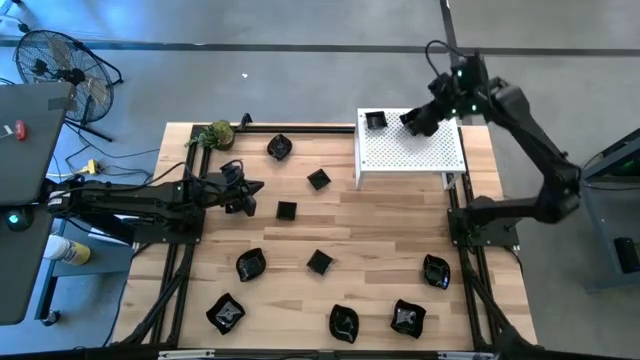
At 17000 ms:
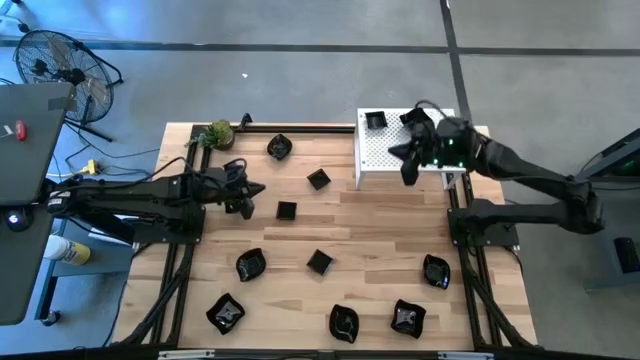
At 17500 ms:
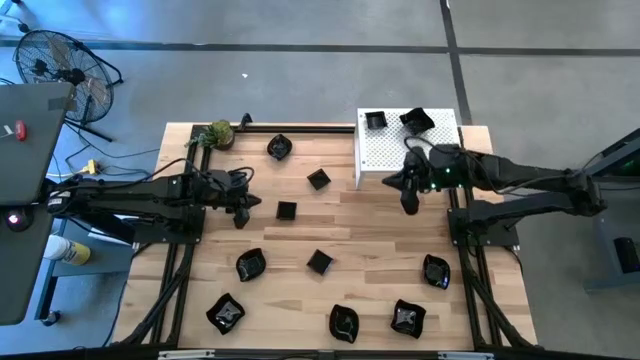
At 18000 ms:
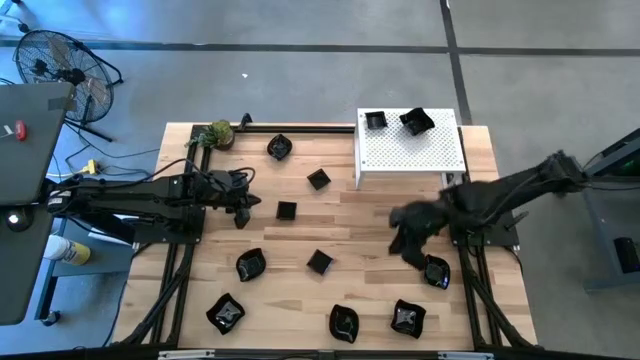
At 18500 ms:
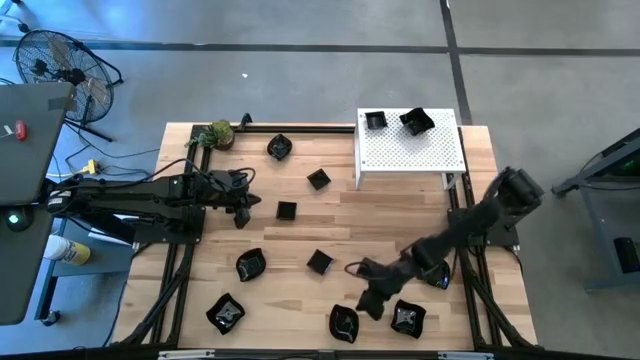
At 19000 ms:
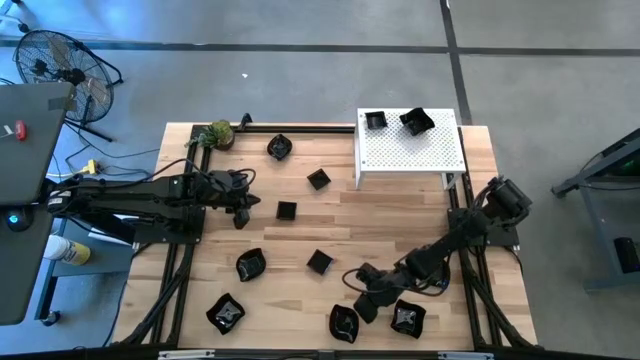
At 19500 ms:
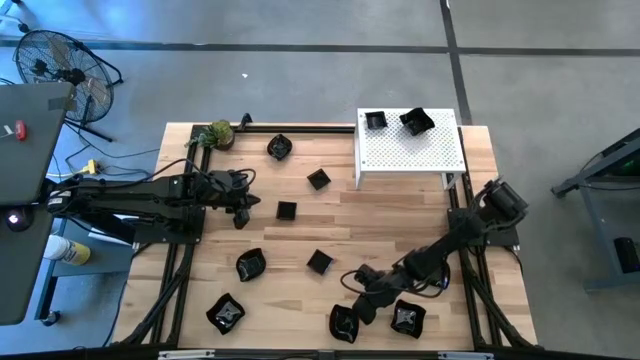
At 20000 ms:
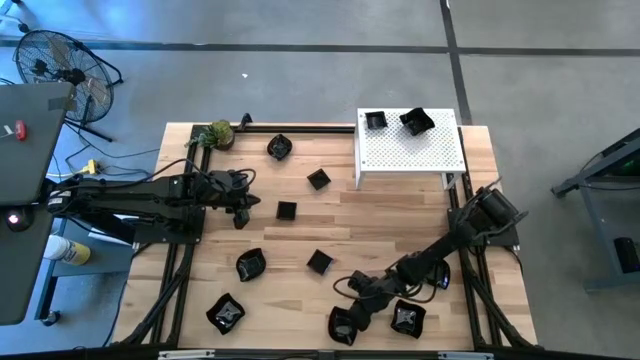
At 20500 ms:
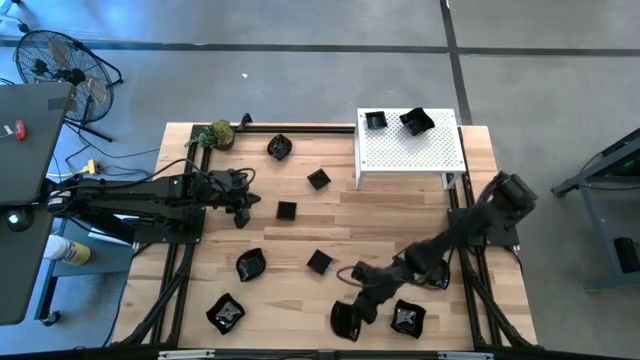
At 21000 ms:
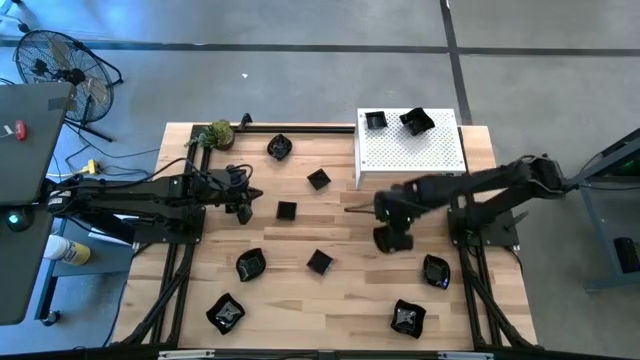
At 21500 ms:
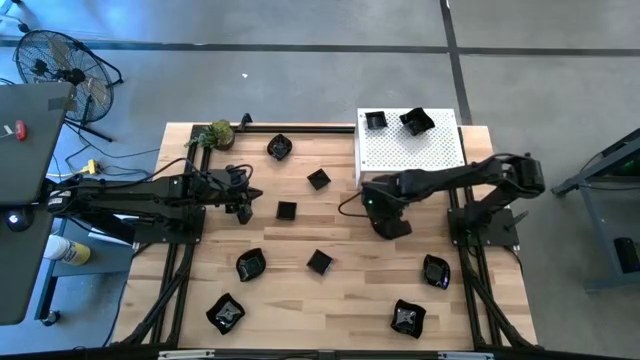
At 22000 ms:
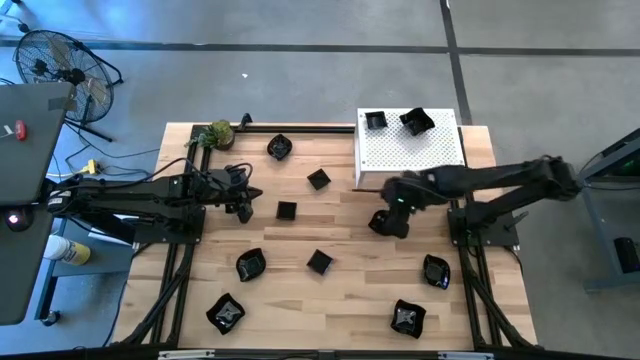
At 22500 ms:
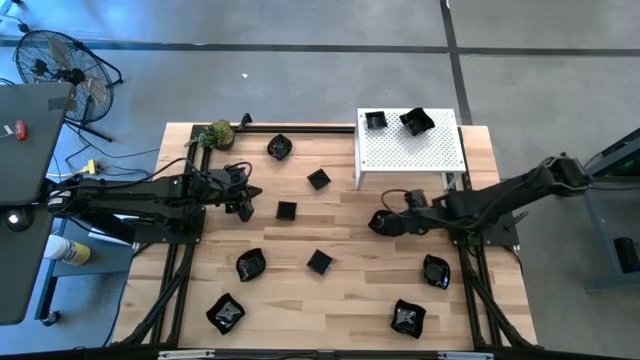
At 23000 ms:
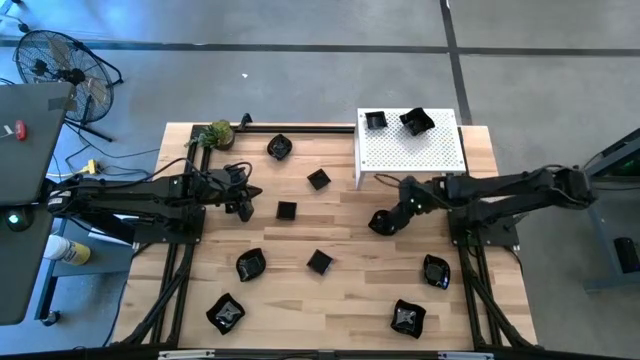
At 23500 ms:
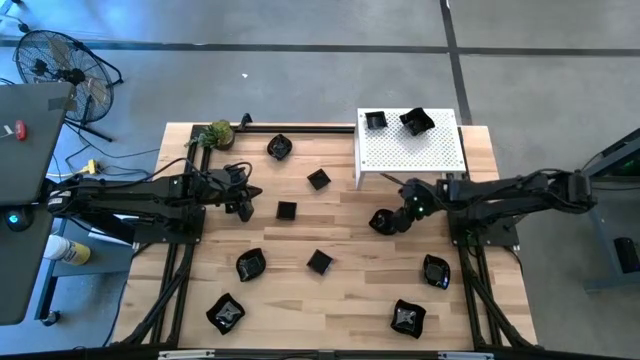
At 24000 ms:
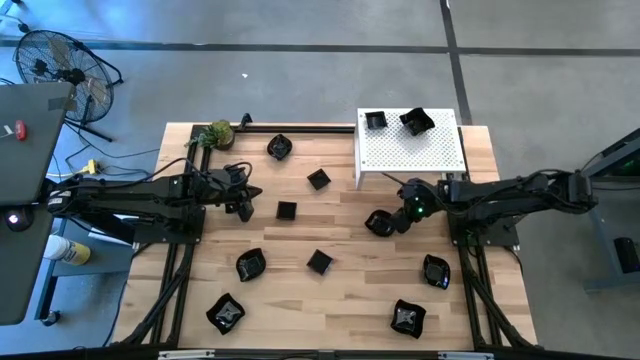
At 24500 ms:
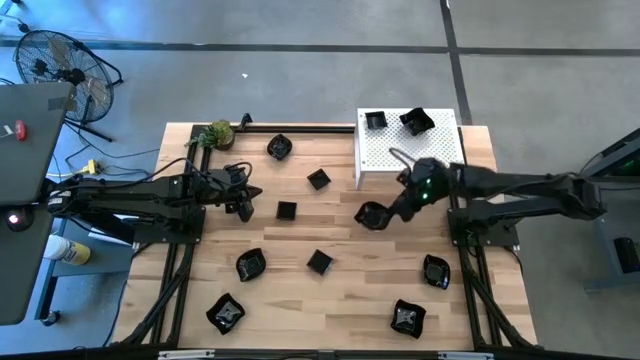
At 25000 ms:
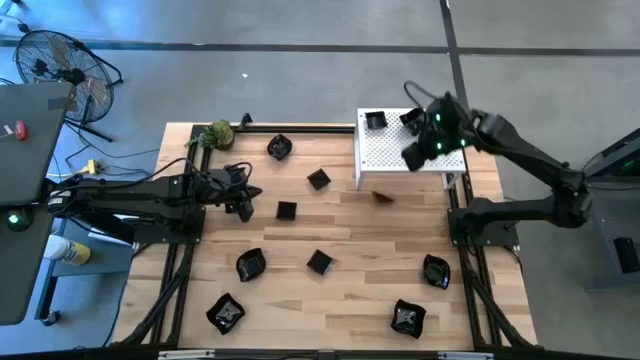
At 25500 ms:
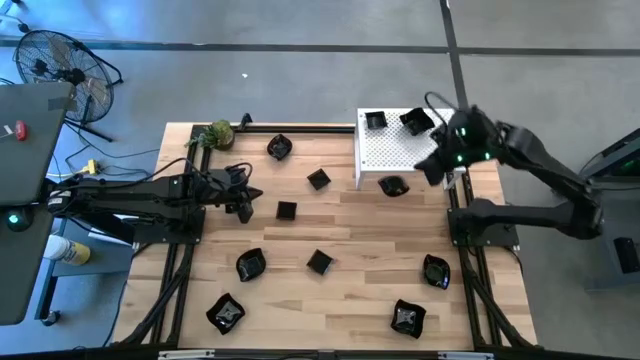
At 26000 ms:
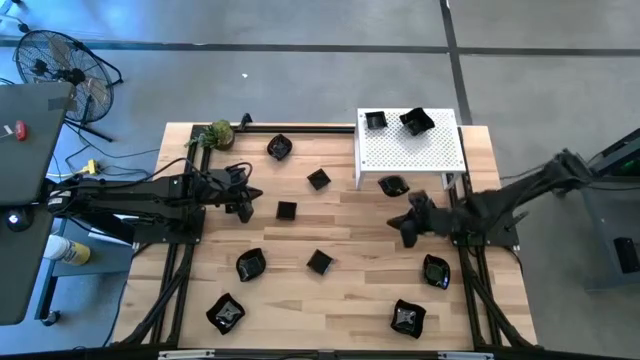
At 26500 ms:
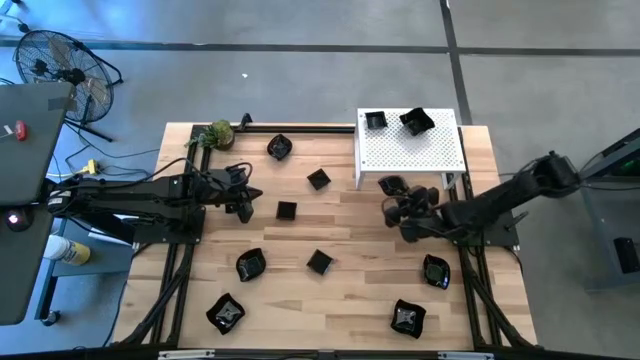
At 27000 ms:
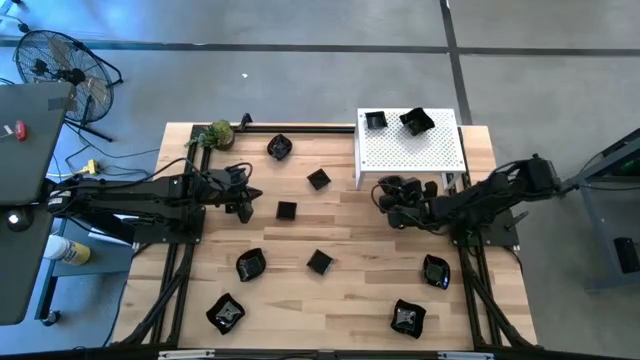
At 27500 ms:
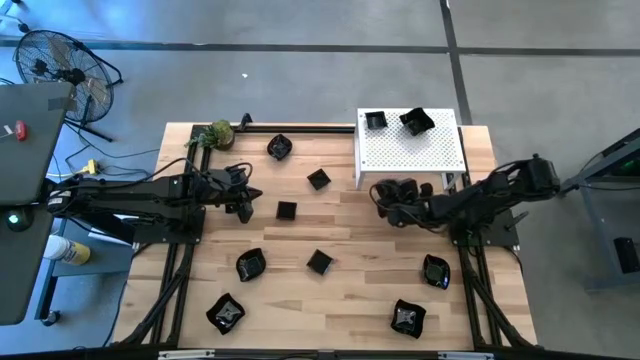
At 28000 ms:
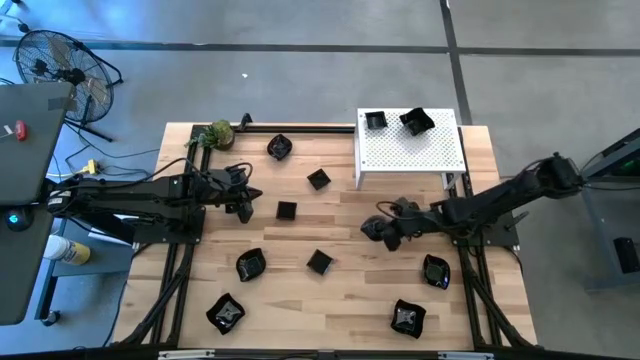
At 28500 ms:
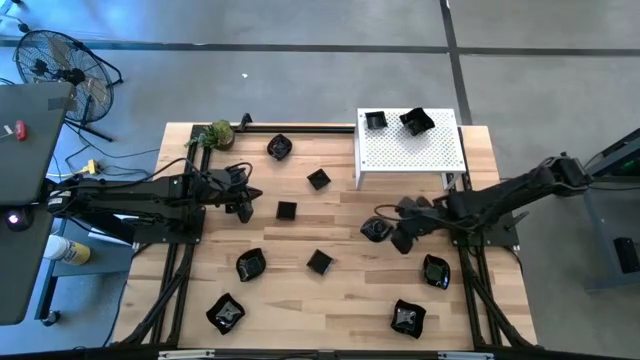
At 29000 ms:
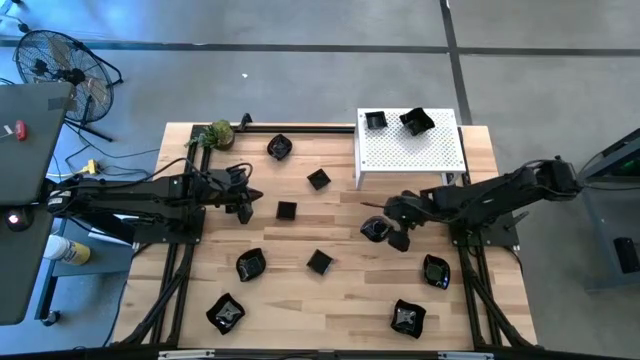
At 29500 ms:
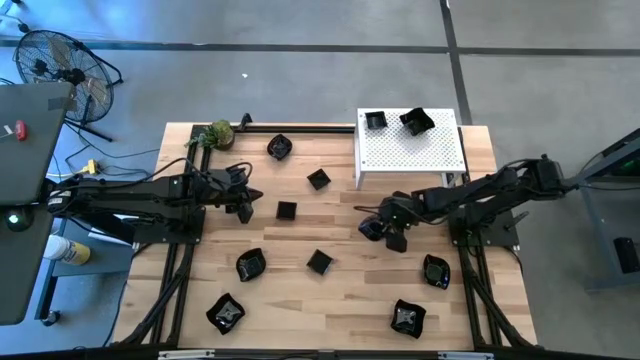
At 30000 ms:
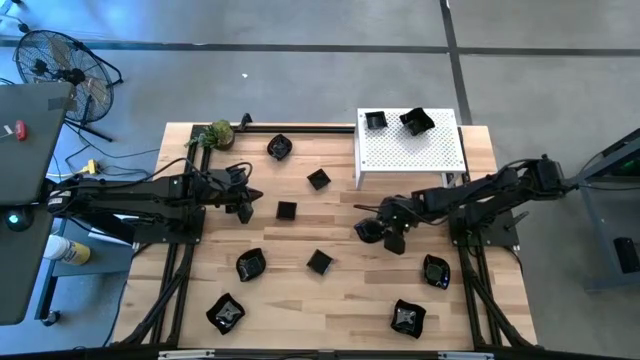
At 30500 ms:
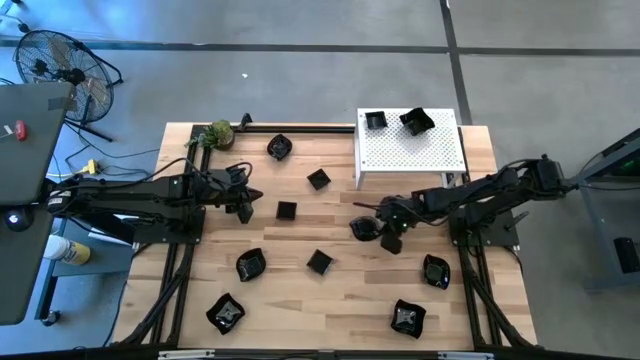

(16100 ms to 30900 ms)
Task: Pick & Place Mini shaped plates
Put the leaf-shaped plate on the shelf

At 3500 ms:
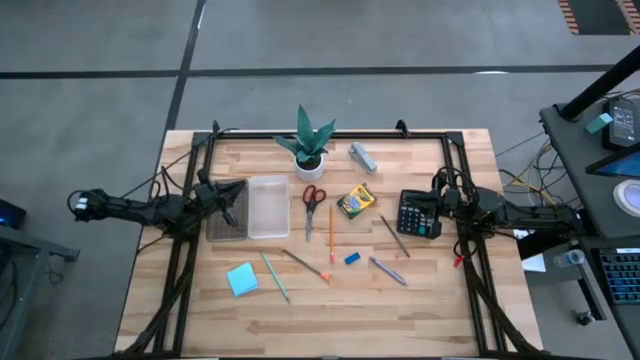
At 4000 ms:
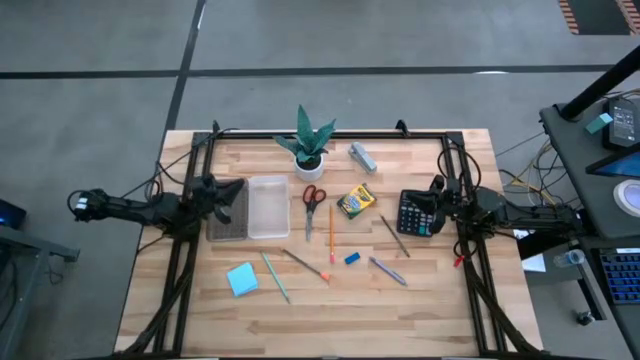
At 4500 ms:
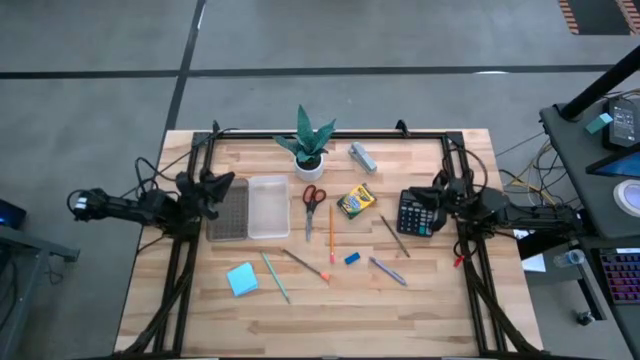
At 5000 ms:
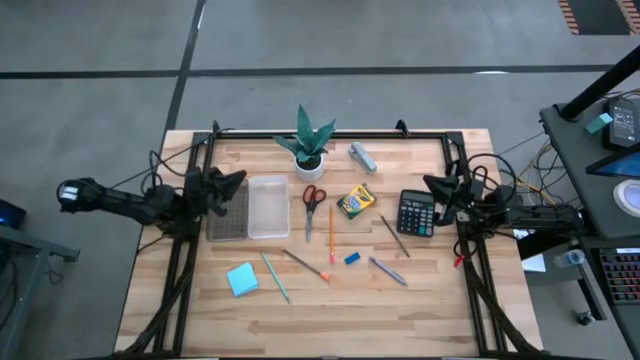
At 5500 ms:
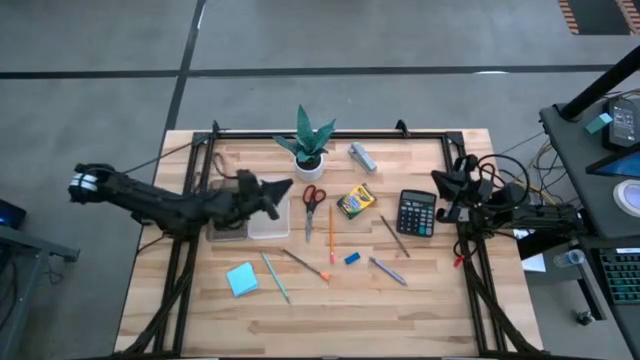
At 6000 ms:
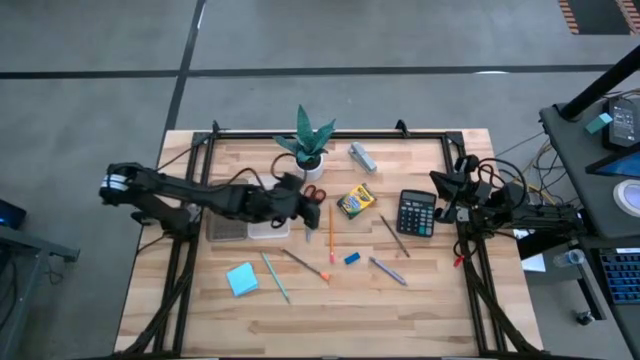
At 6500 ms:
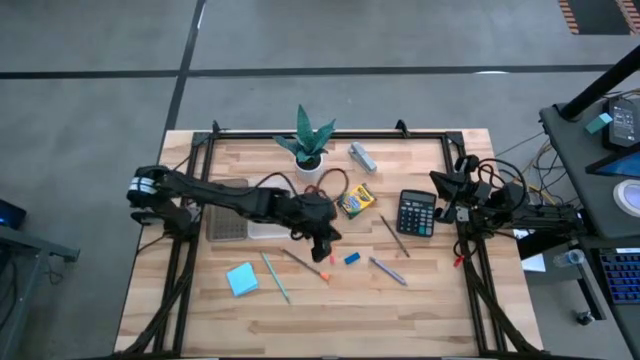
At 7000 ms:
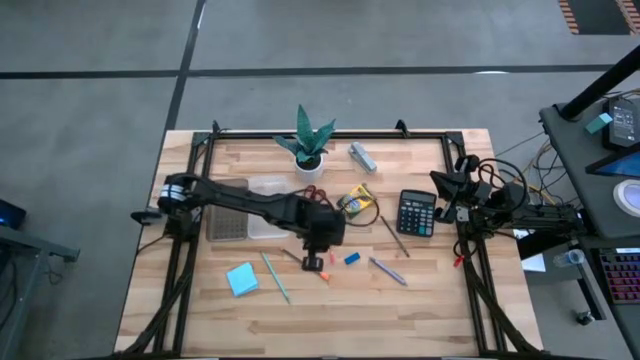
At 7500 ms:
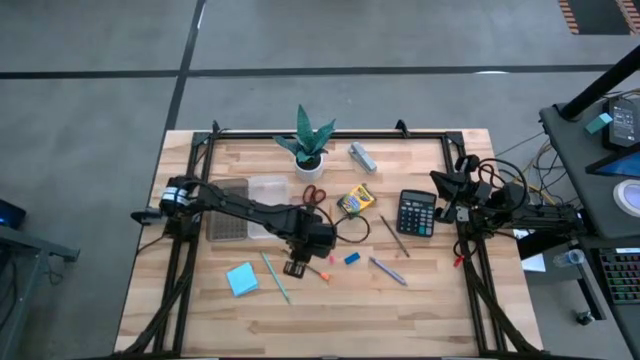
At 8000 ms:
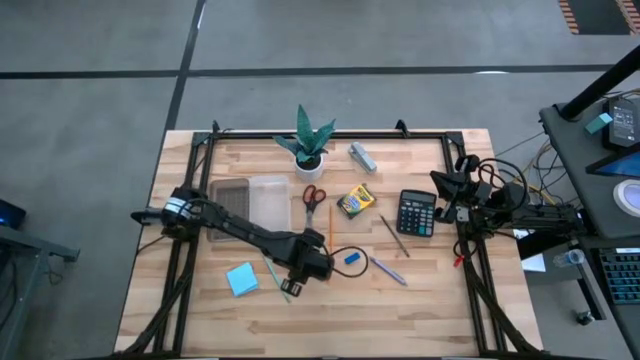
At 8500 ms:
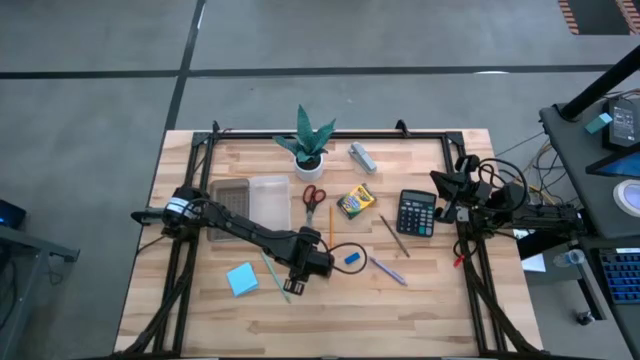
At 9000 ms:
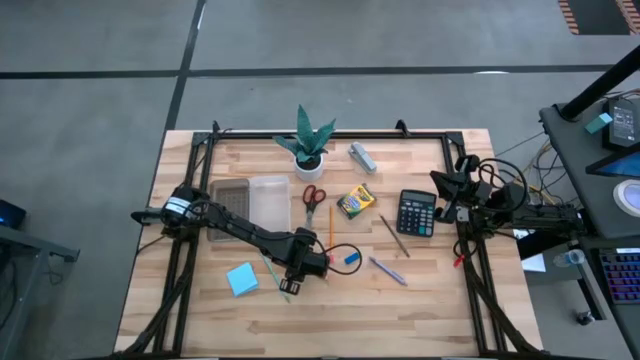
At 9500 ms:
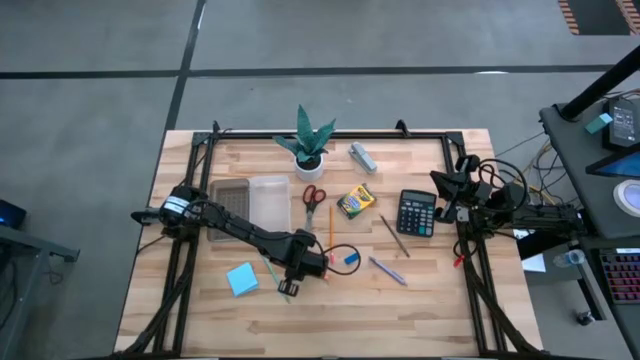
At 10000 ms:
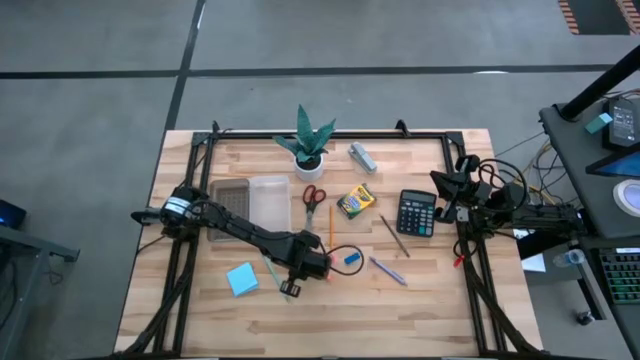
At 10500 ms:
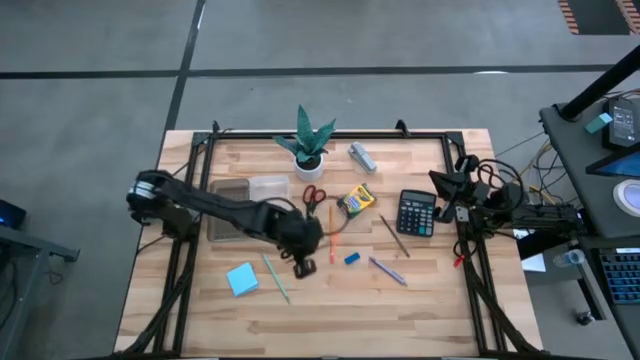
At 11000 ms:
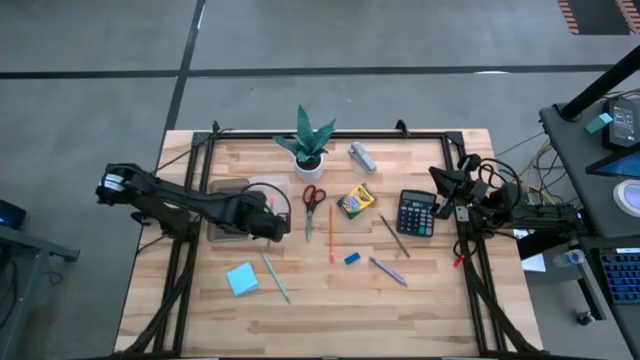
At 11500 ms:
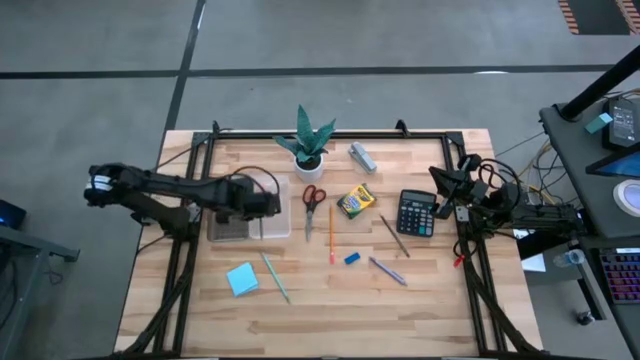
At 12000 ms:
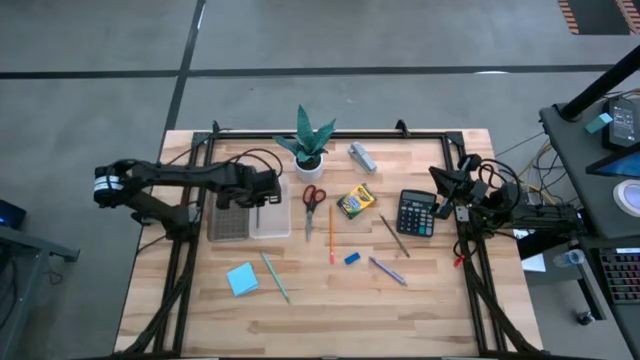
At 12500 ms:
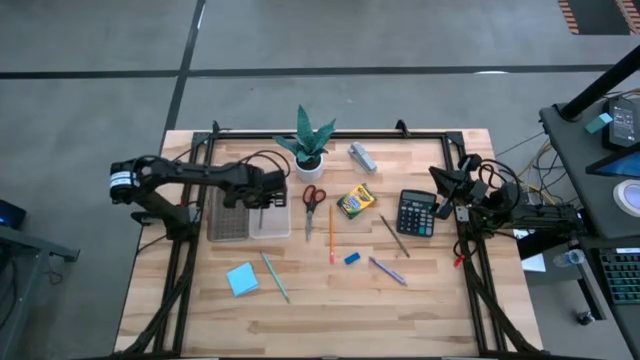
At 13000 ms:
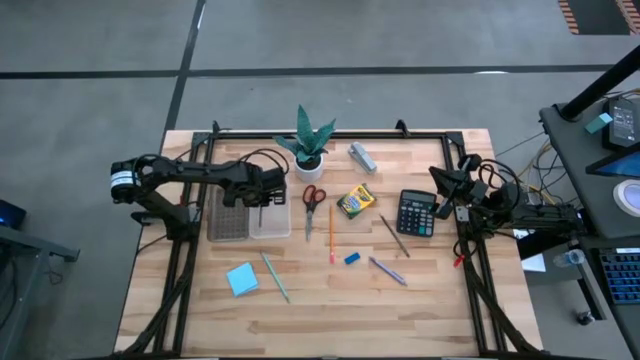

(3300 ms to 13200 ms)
Task: Pack school essentials
Put the dark green pencil into the white and black box
